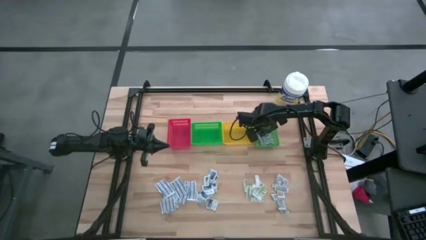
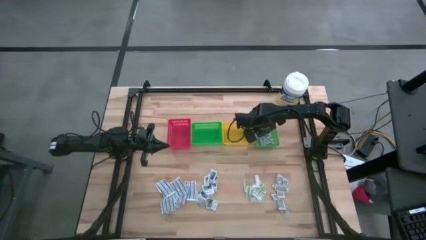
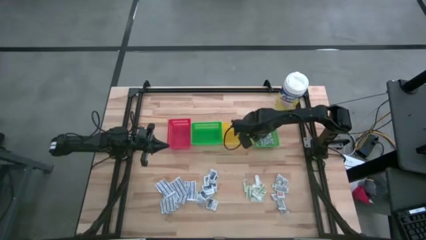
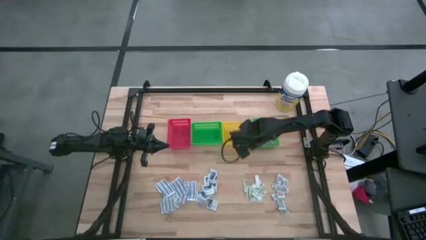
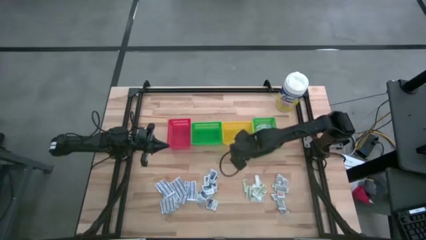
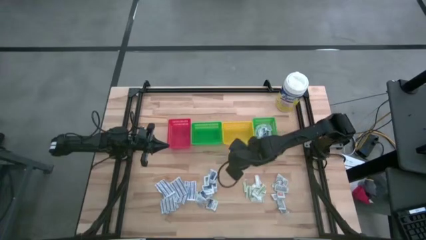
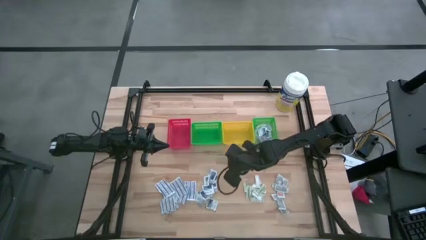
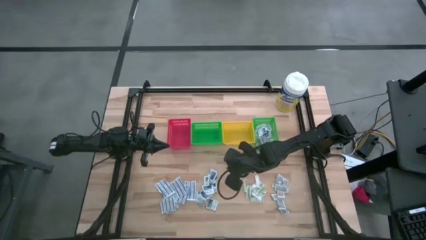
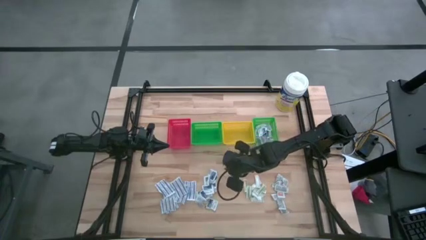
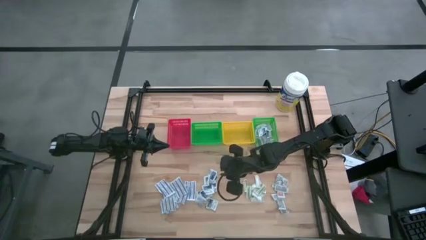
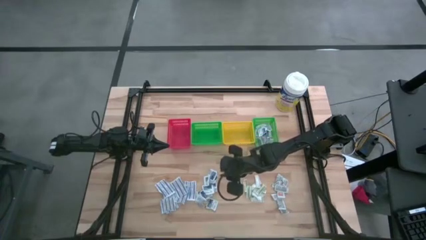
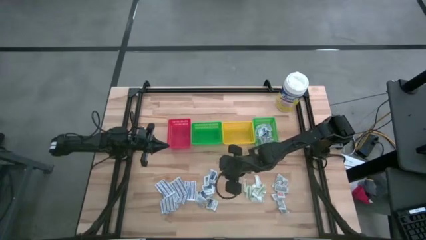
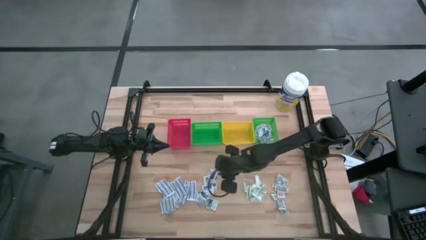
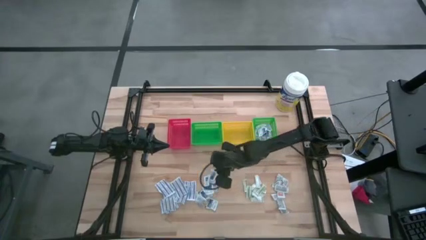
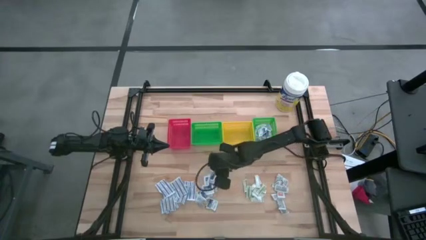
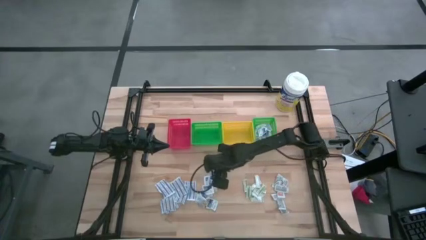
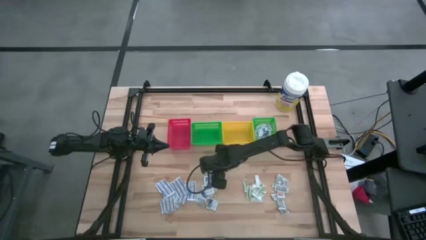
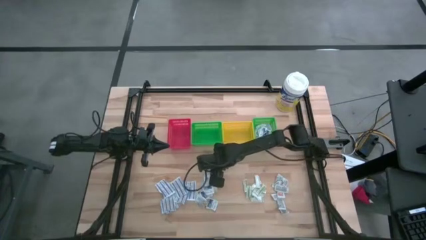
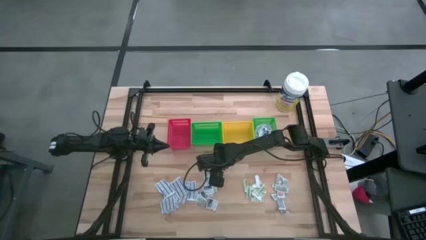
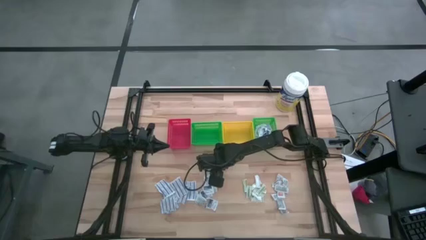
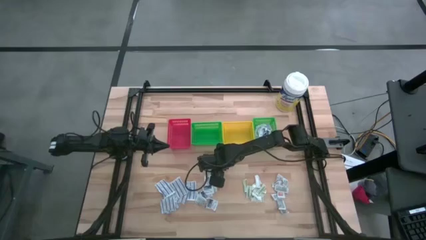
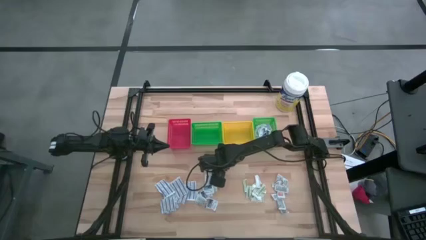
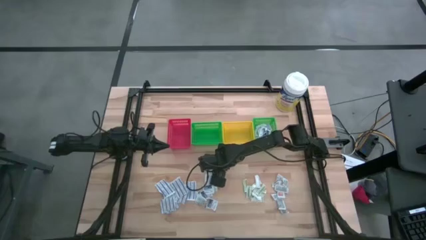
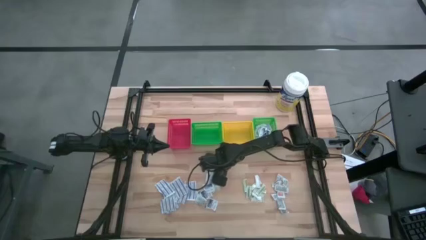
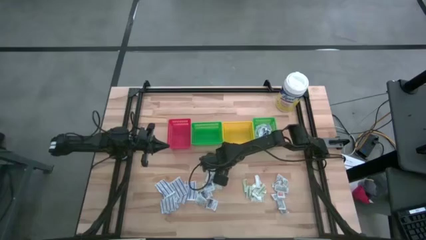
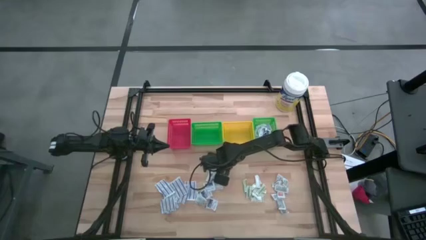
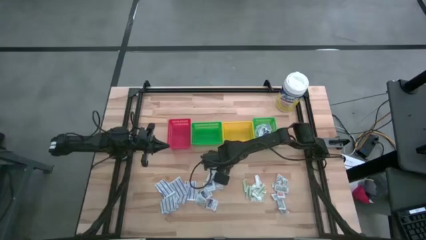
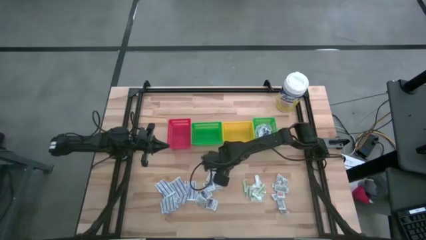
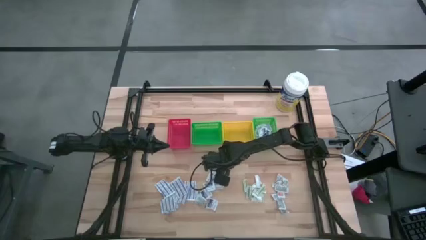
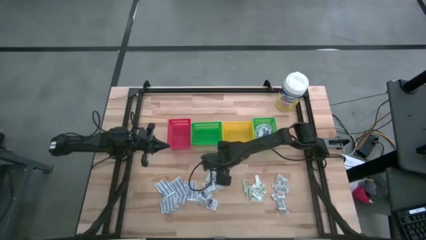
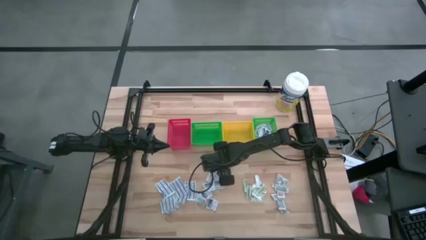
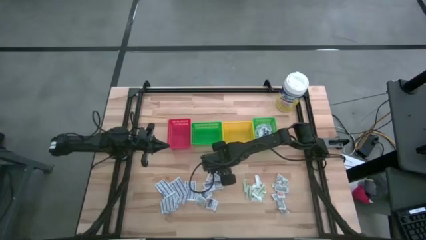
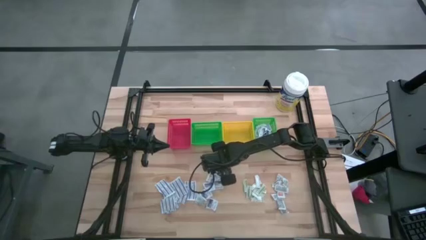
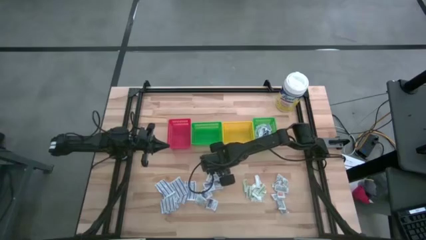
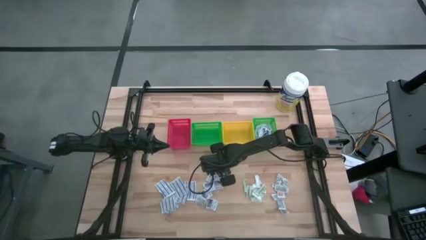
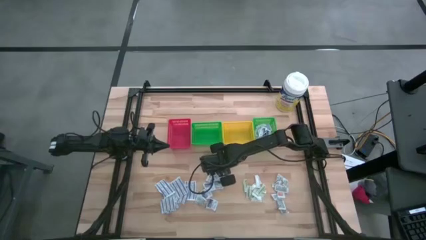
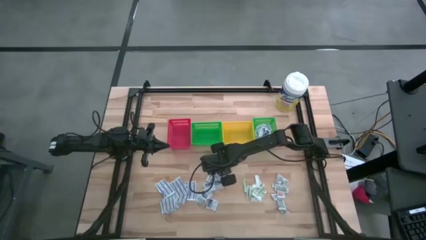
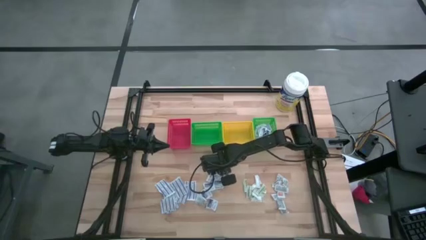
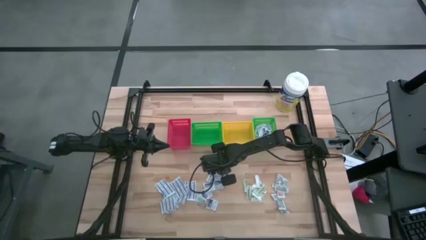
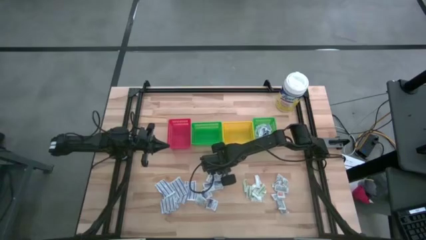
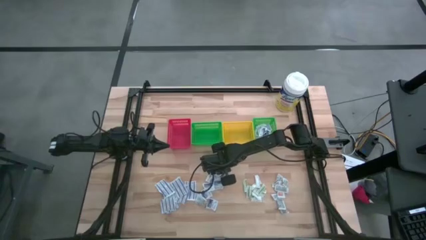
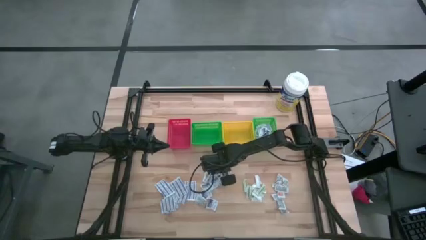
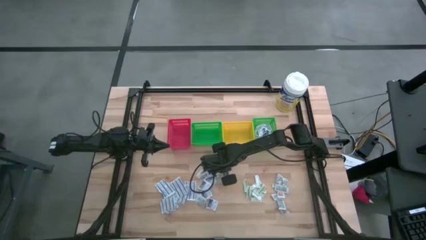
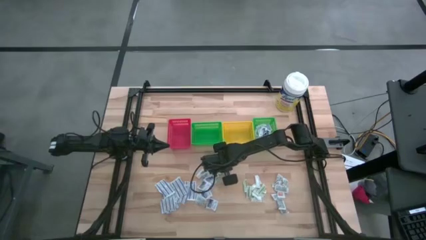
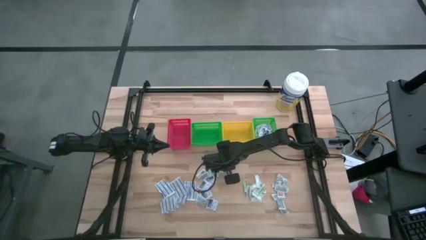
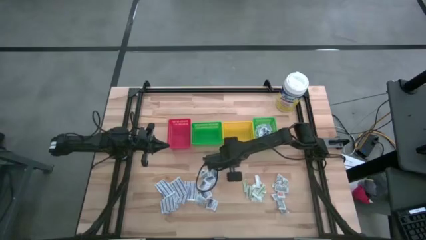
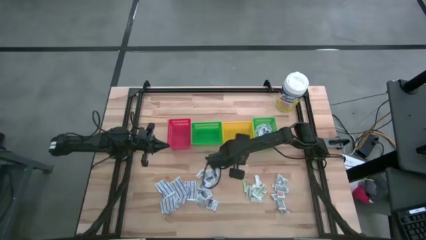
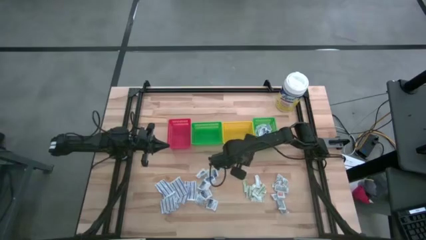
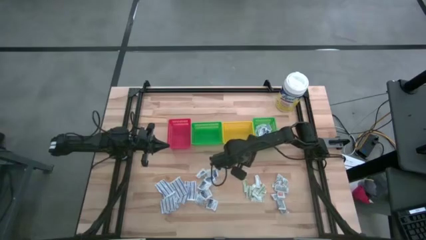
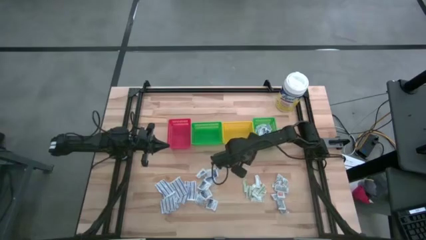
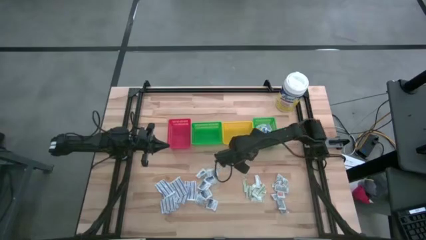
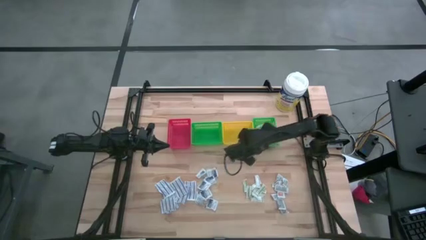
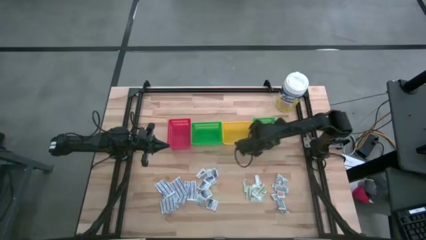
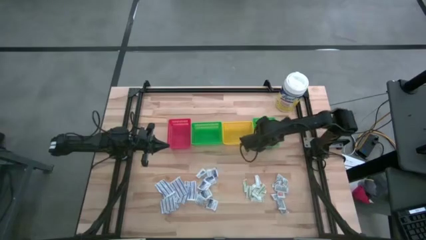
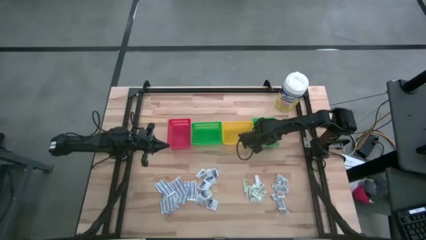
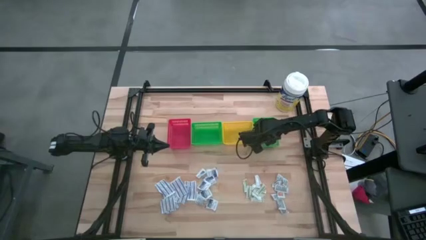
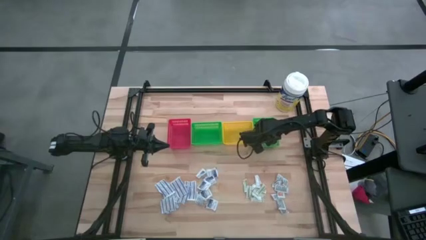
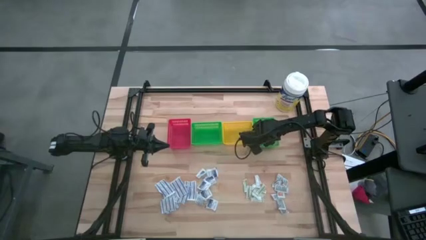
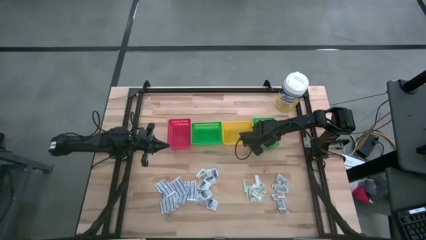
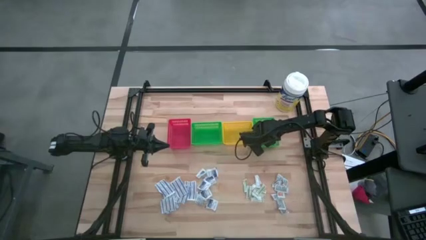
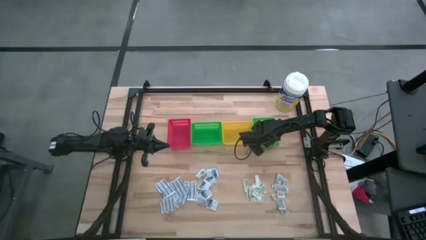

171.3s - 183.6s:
Task: Pick & Place First Aid Supplies
Put the blue alcohol pad into the right green bin
